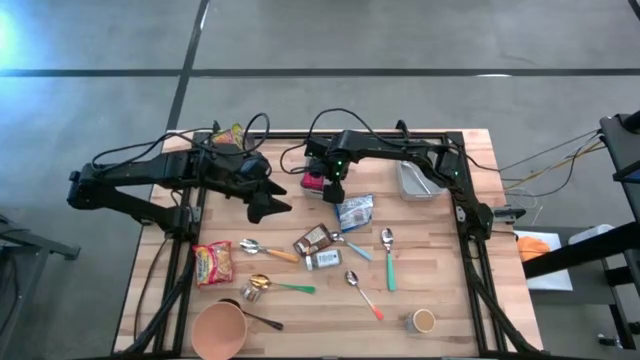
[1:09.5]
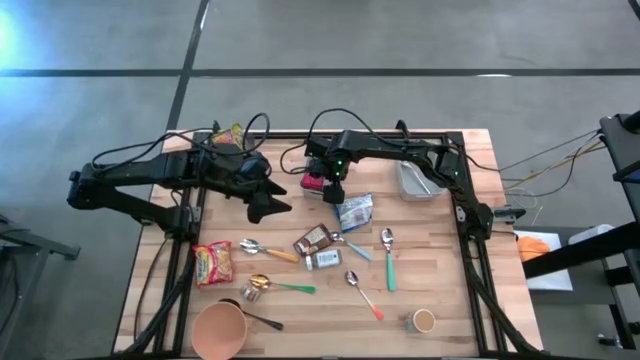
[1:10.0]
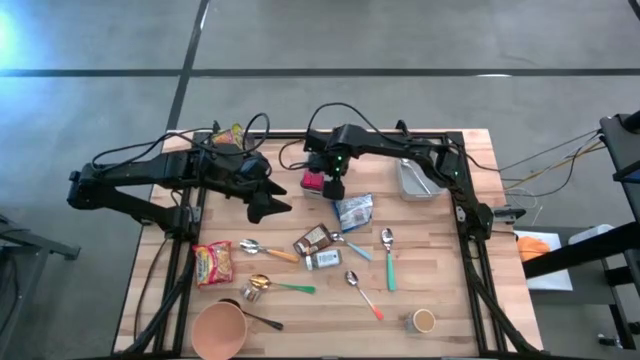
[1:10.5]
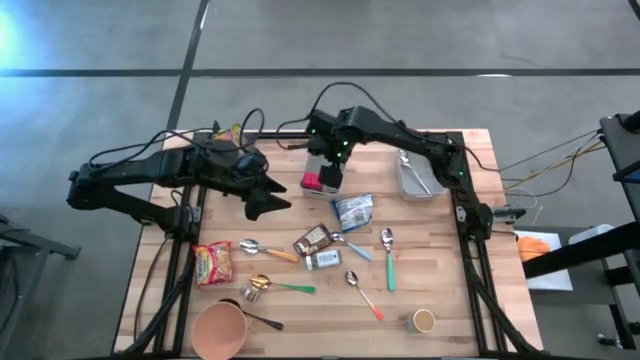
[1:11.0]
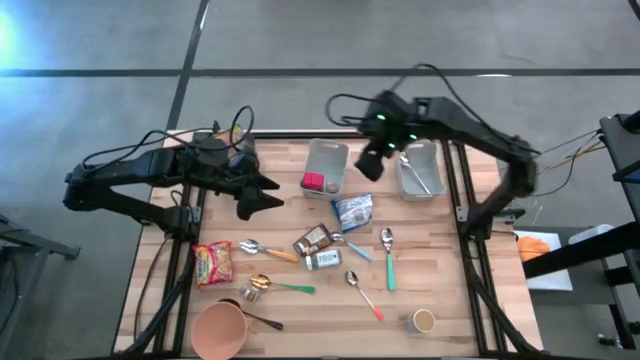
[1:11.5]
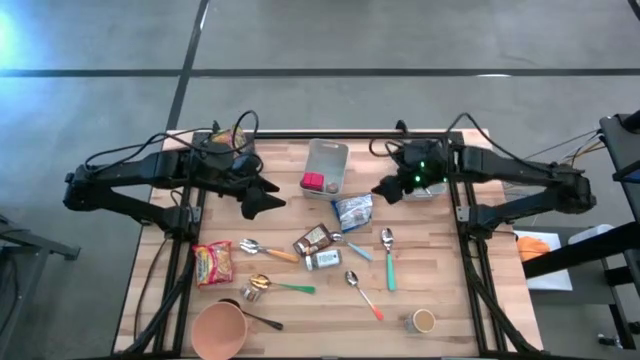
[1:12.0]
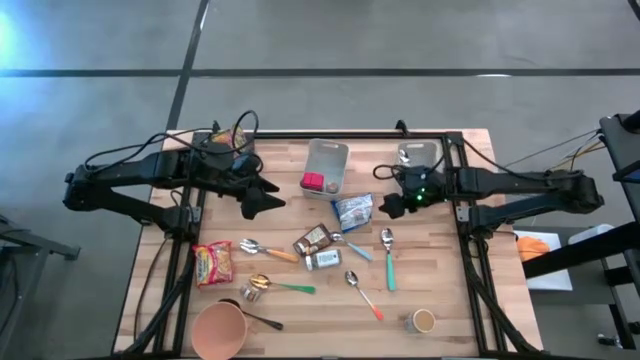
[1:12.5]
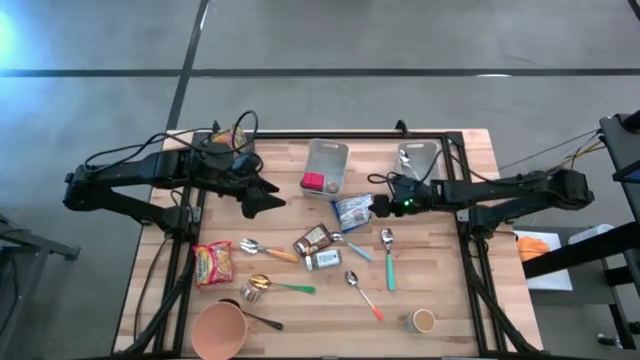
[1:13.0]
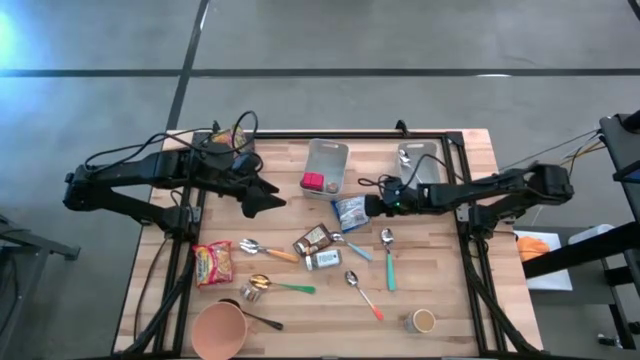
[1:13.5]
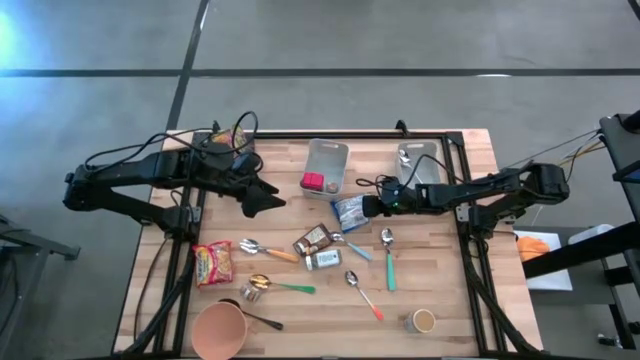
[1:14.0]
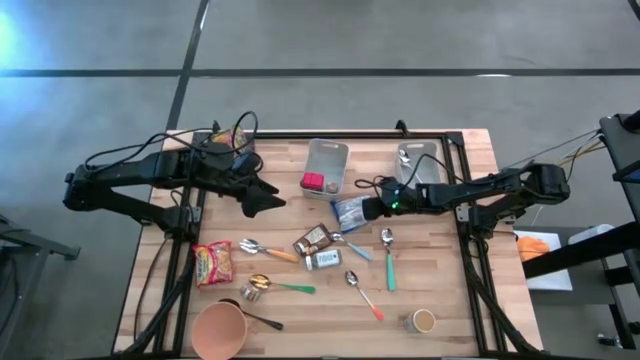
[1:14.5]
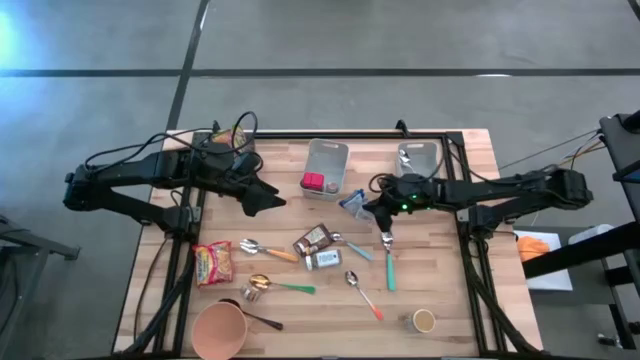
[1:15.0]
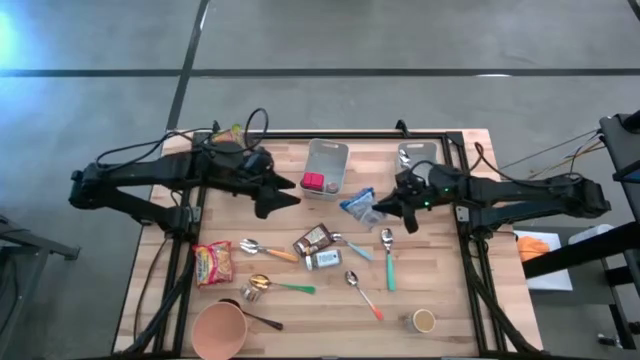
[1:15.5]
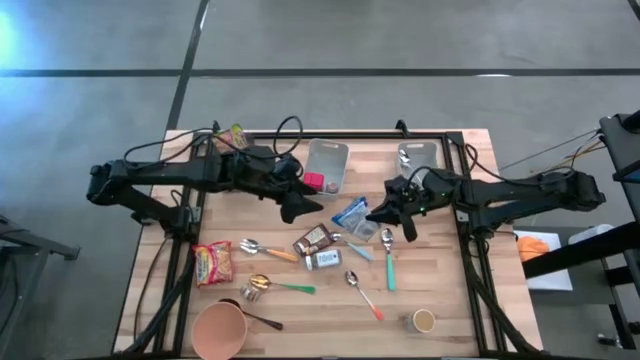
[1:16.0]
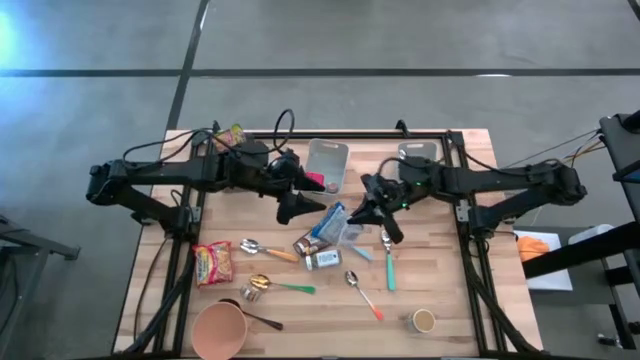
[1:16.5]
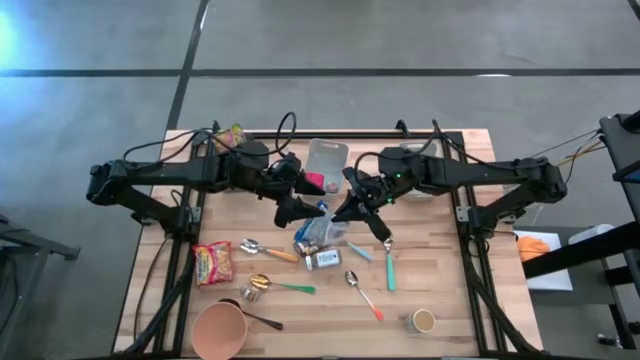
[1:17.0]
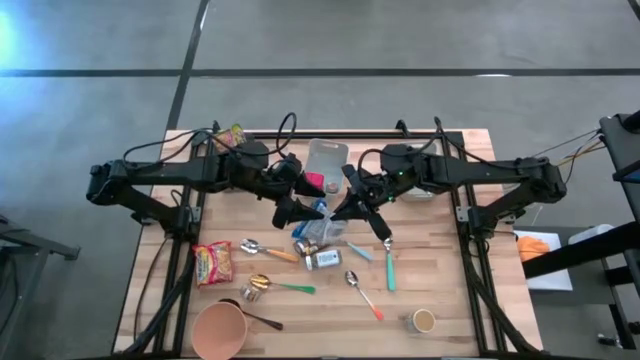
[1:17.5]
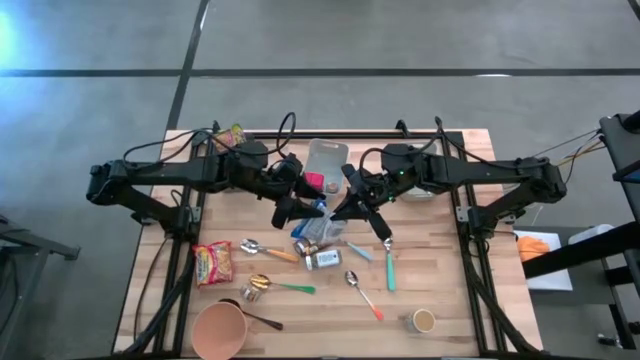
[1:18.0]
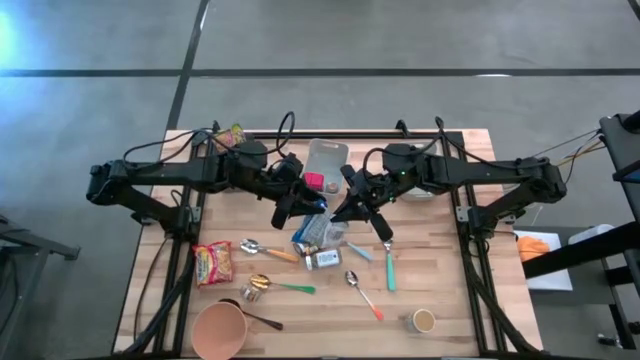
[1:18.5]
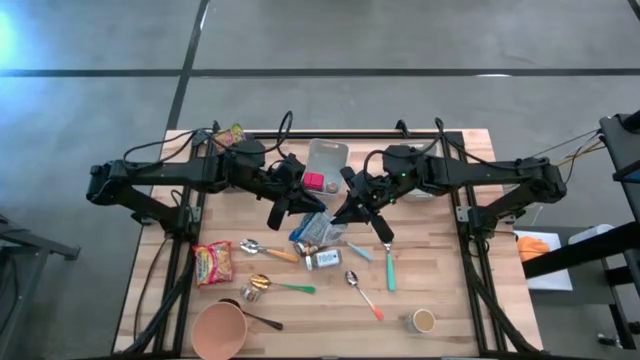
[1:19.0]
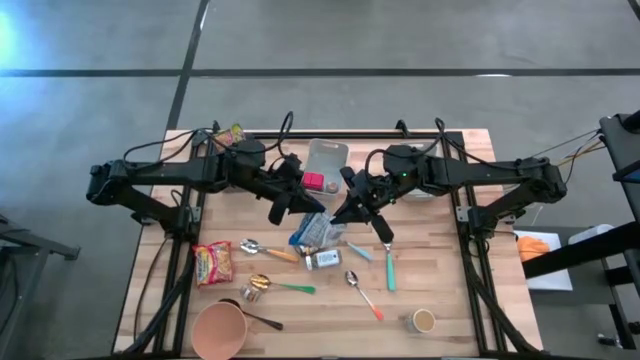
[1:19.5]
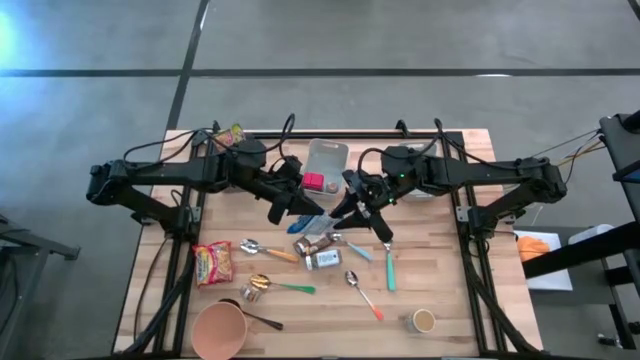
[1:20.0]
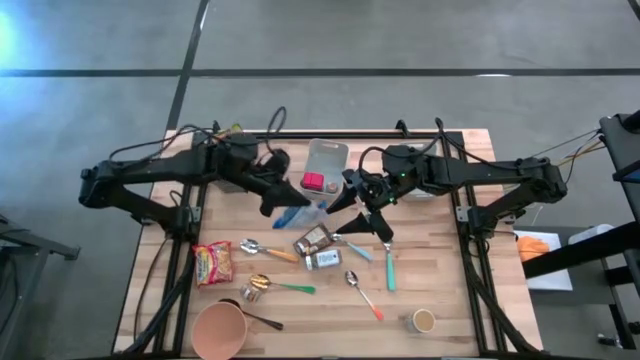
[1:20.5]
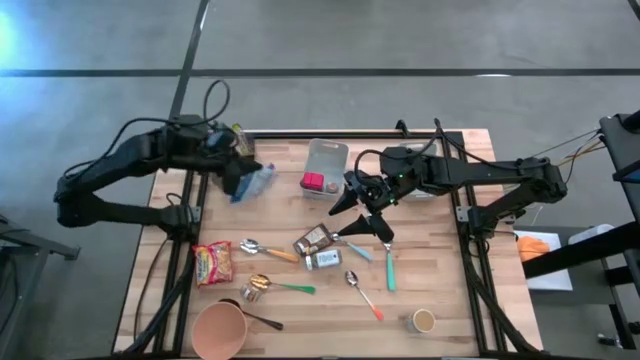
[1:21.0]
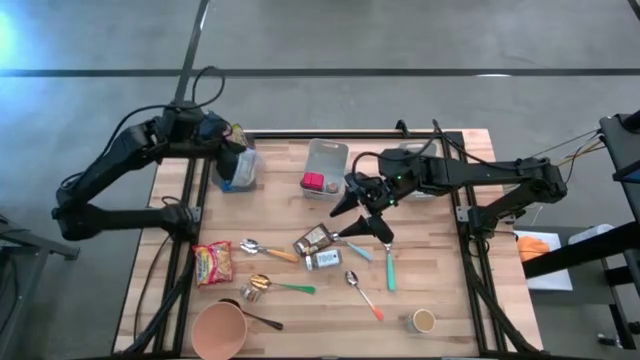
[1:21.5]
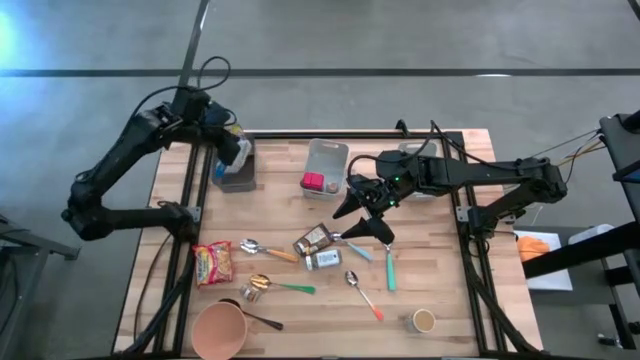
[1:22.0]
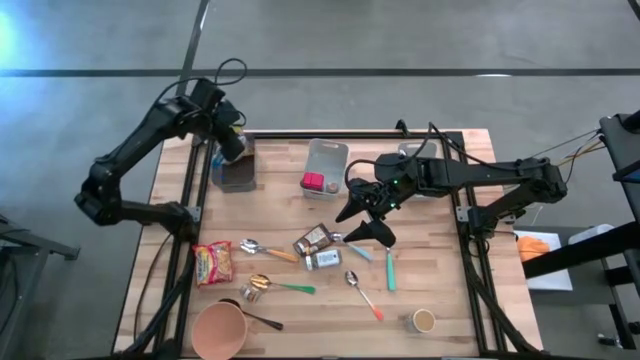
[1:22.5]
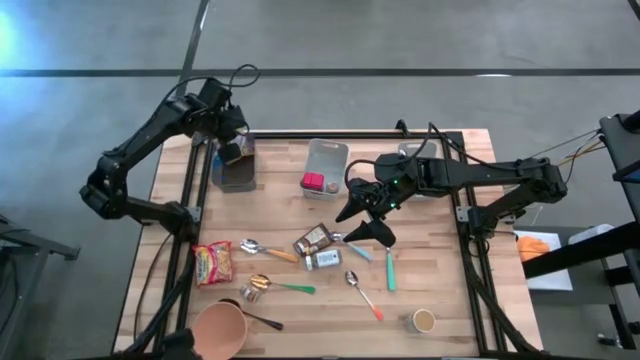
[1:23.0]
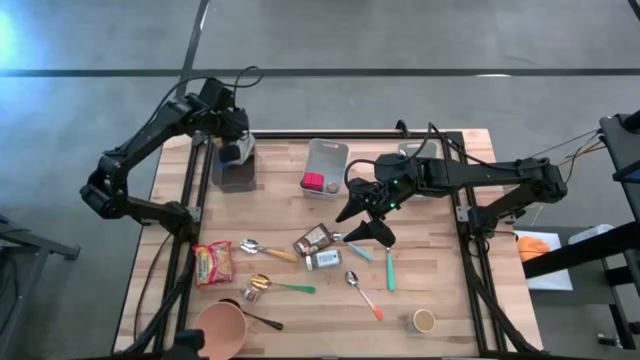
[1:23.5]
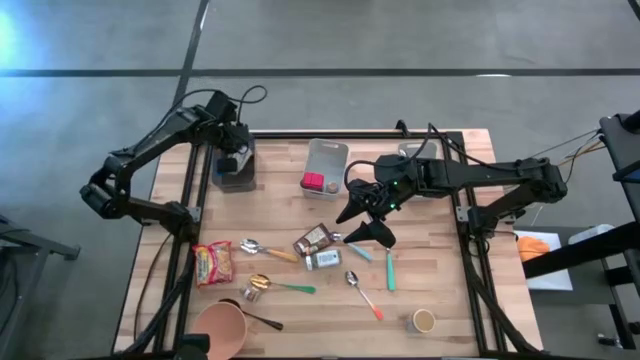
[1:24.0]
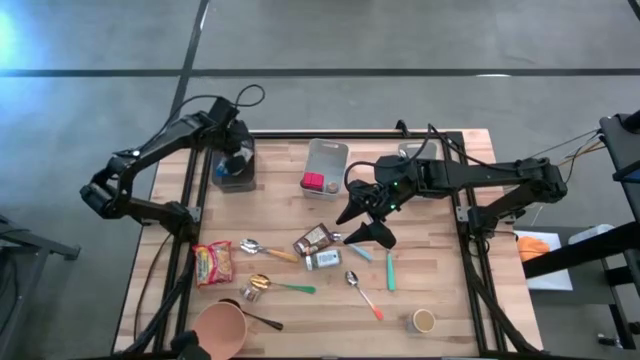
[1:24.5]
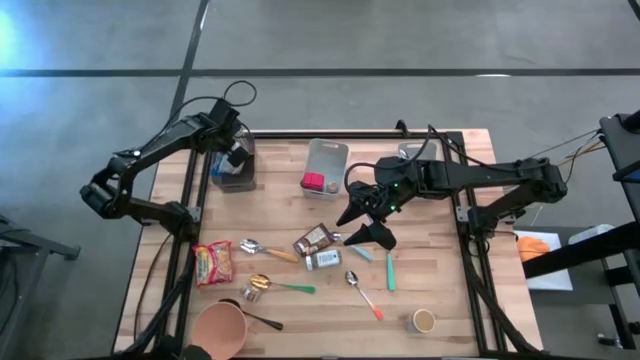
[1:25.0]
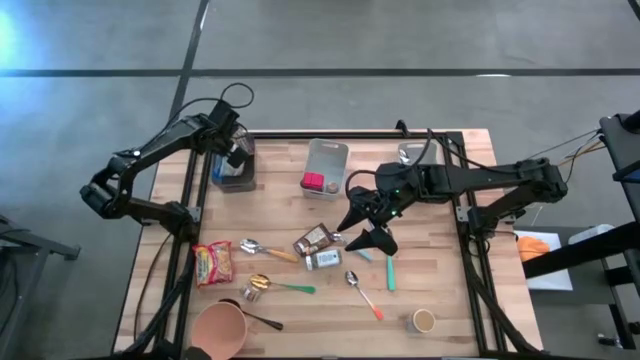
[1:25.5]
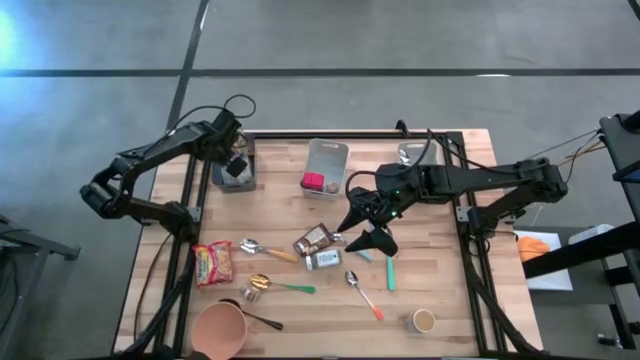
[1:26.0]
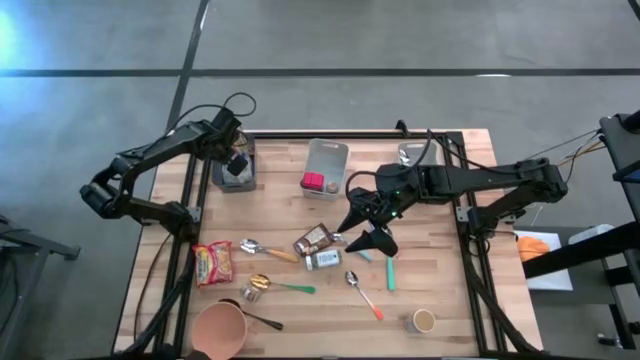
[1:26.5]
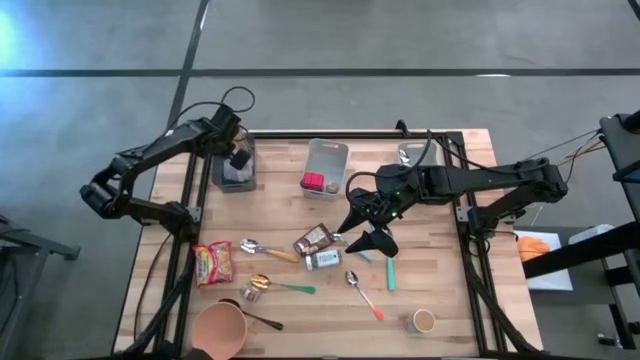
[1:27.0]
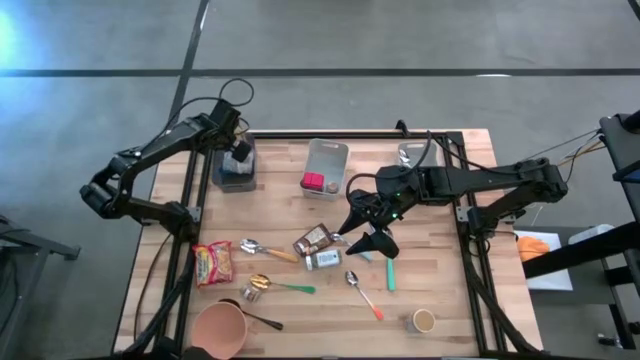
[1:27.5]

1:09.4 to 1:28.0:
Put the blue noodle pack into the black bin
